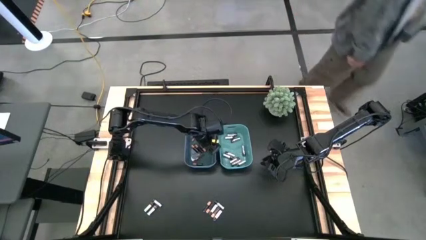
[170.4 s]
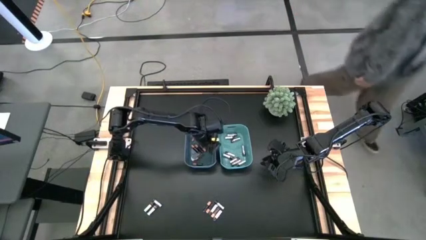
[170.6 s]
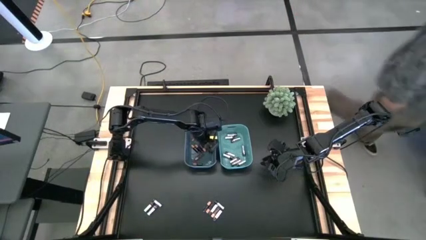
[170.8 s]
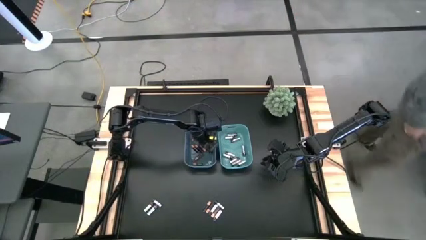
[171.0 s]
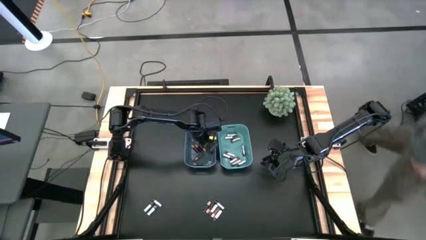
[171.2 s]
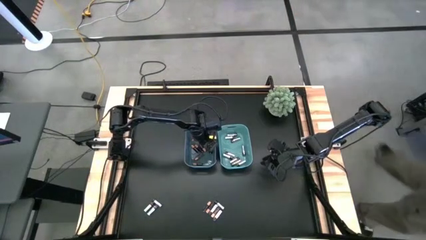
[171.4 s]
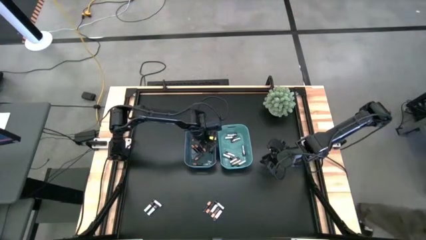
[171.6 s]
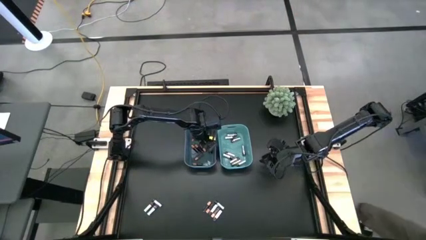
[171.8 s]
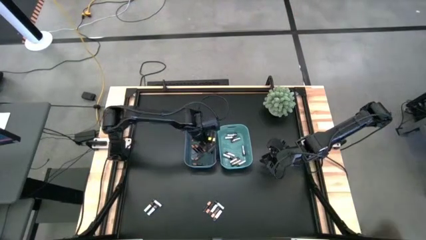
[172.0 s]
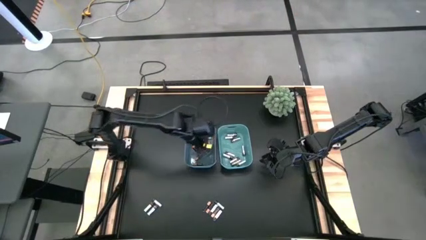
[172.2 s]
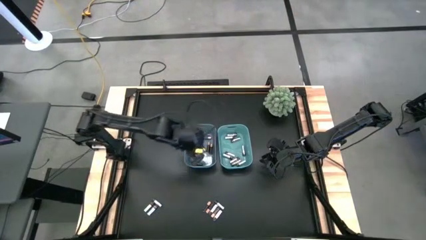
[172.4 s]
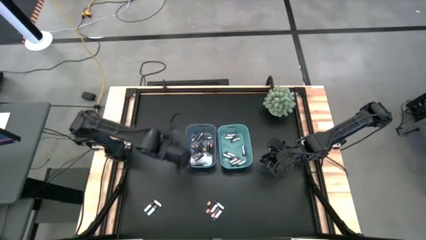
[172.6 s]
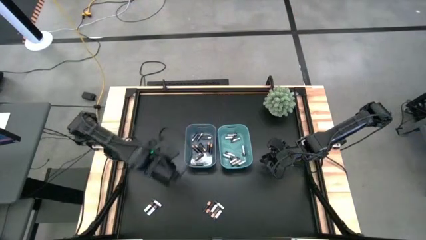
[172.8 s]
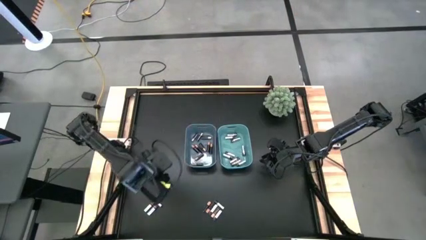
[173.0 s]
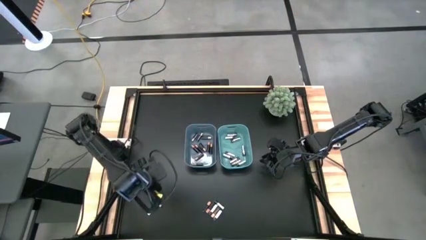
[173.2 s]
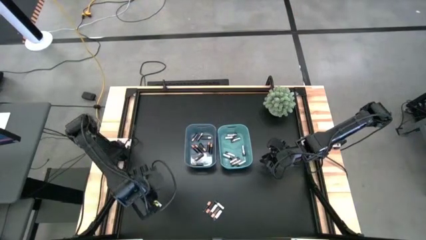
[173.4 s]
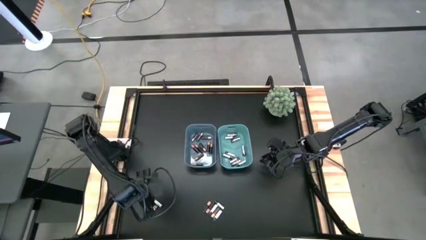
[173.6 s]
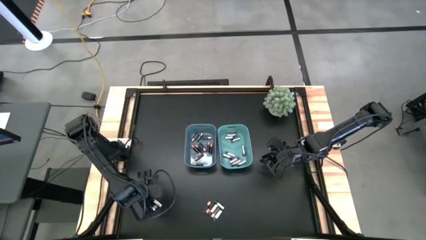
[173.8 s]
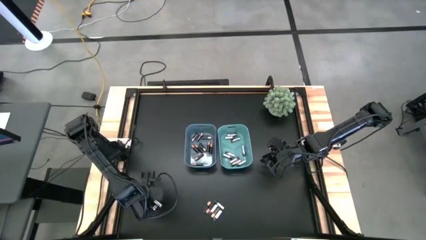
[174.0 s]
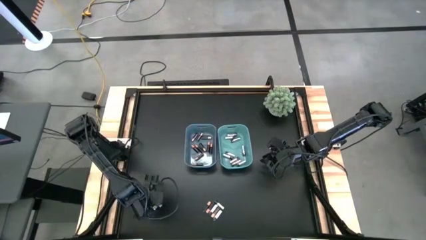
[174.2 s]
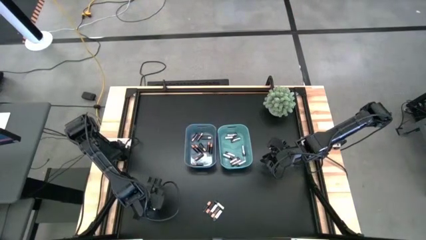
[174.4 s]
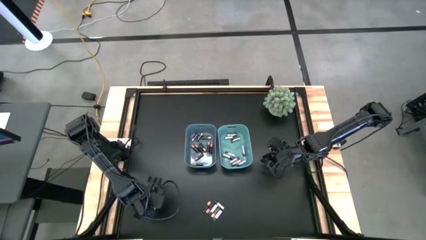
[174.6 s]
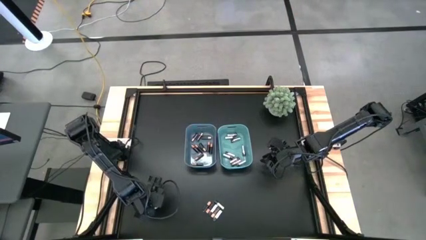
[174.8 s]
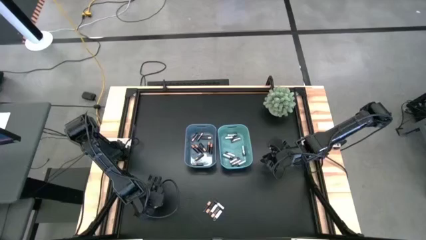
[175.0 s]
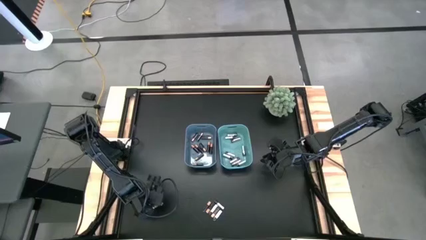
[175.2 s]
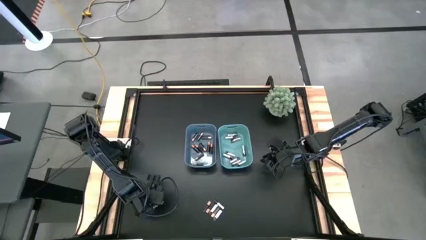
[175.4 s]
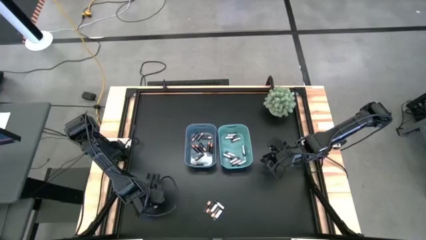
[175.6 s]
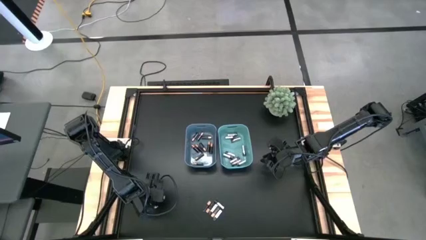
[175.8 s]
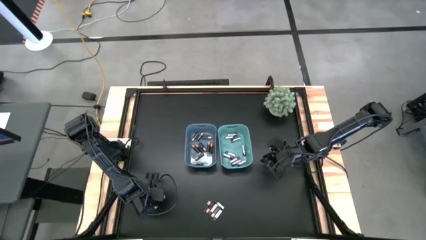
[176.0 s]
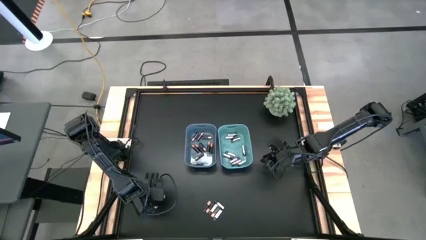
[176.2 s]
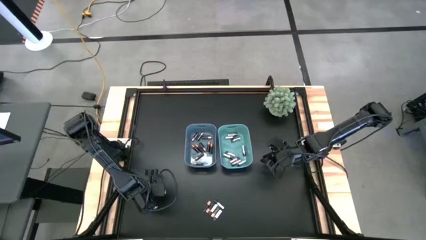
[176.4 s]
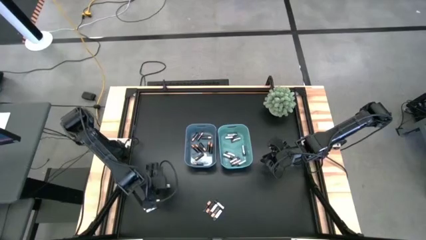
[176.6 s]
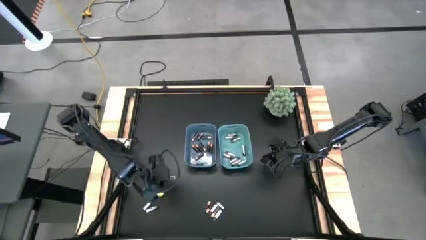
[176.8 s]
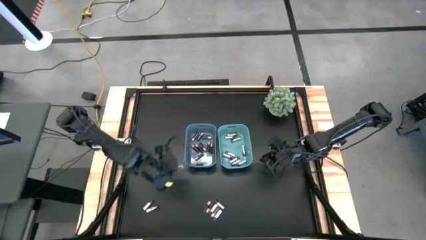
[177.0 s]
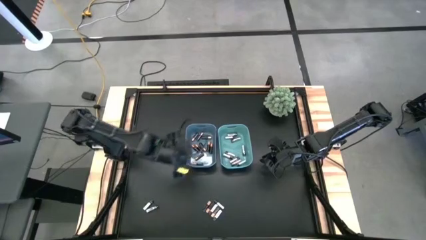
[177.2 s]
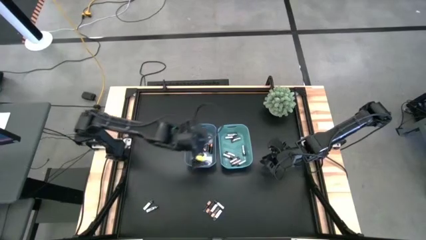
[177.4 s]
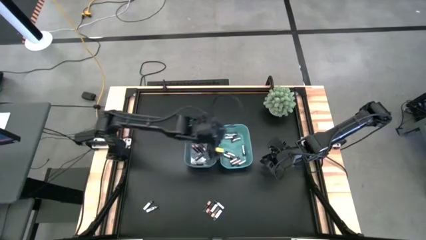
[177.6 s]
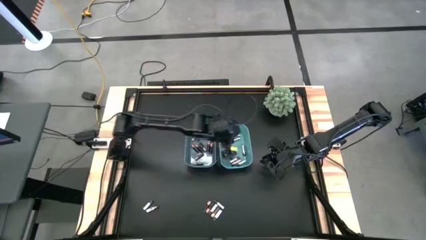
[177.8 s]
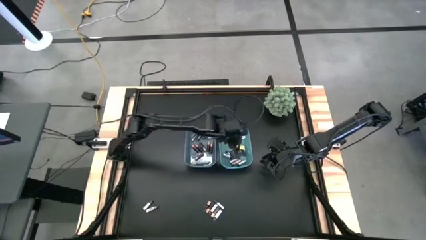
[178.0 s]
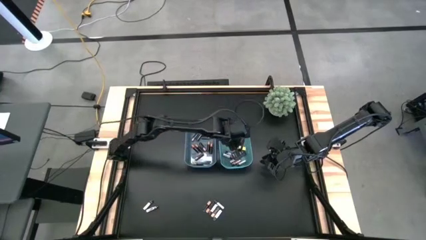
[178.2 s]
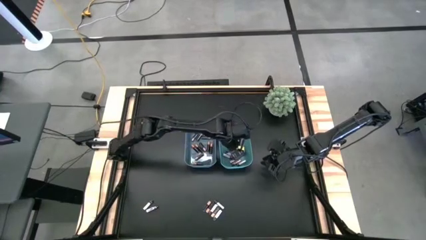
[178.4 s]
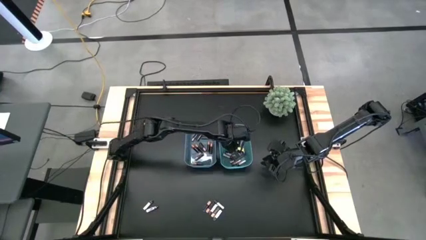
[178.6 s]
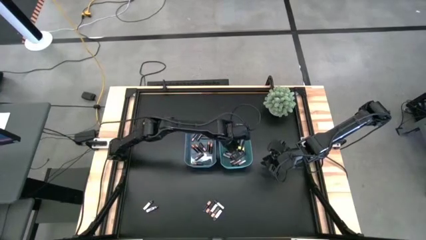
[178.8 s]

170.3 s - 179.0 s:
Task: Sort batteries
Put the white battery into the green bin

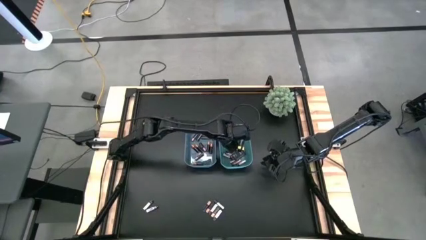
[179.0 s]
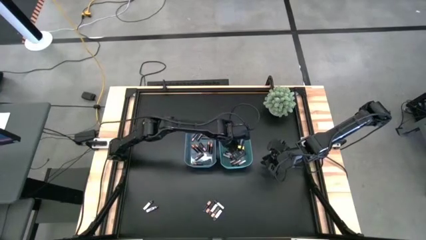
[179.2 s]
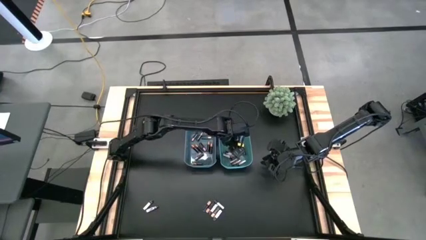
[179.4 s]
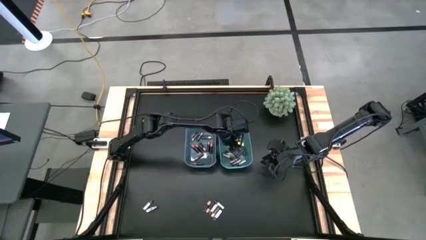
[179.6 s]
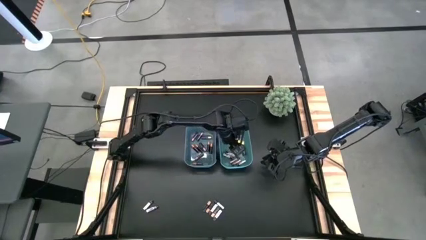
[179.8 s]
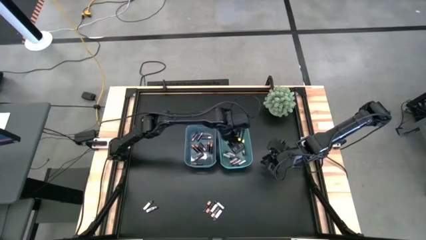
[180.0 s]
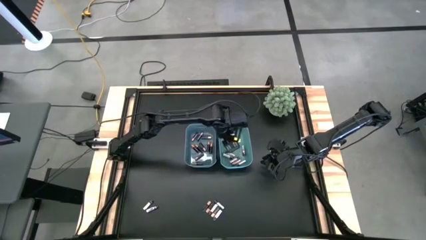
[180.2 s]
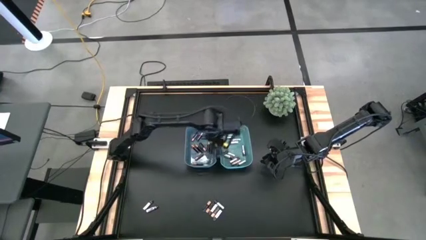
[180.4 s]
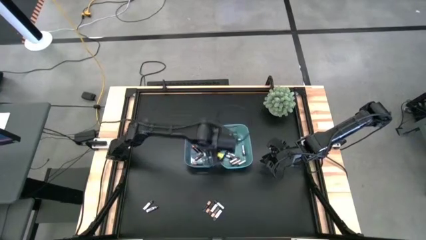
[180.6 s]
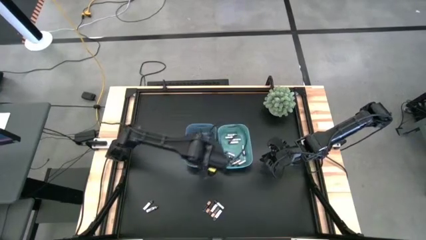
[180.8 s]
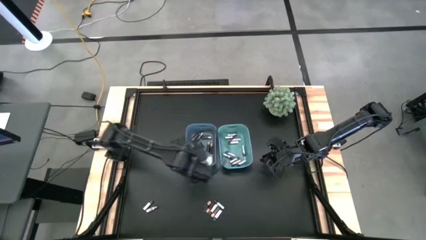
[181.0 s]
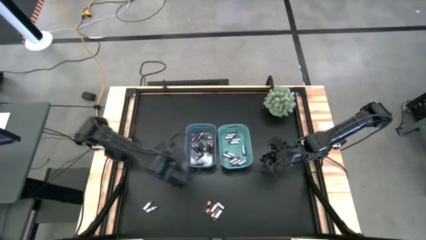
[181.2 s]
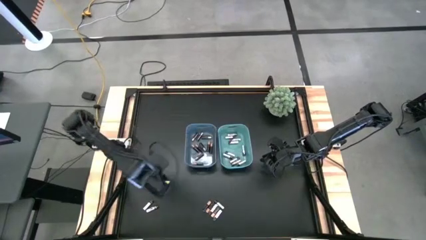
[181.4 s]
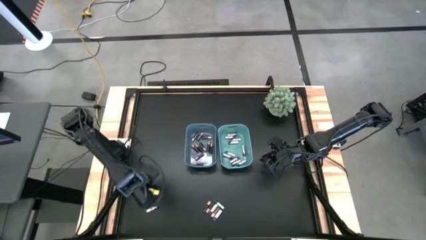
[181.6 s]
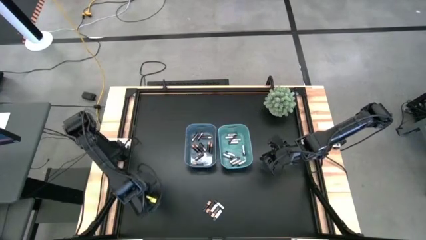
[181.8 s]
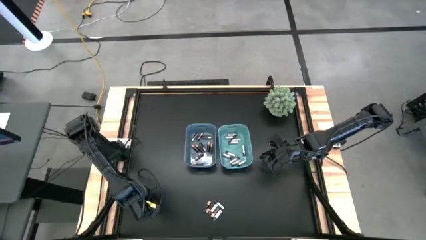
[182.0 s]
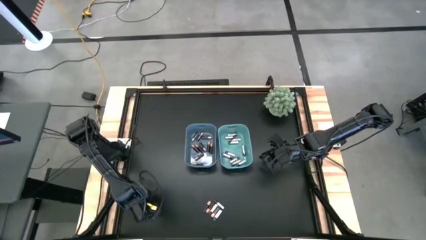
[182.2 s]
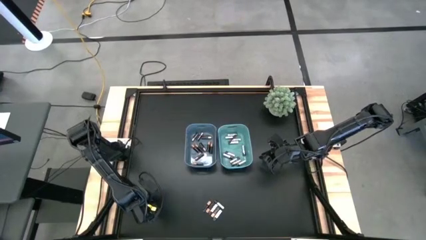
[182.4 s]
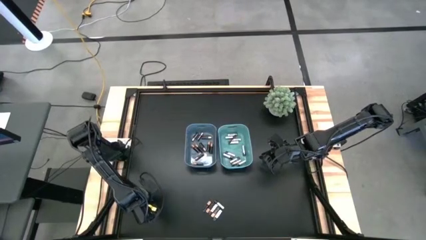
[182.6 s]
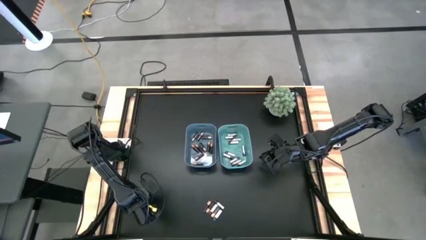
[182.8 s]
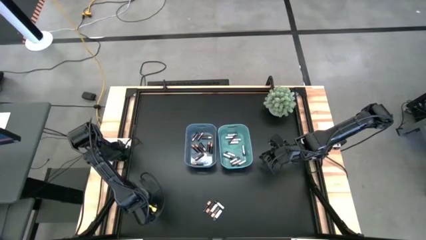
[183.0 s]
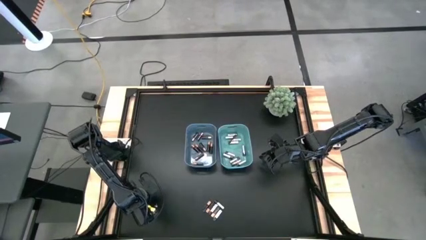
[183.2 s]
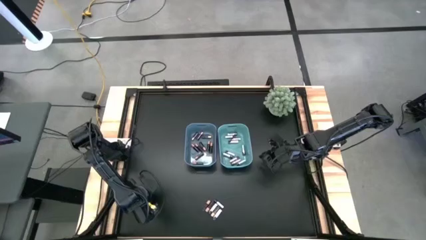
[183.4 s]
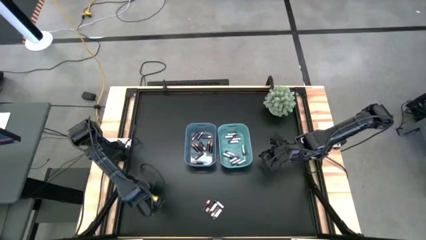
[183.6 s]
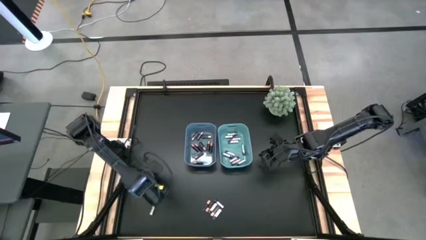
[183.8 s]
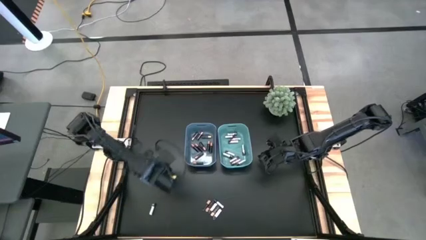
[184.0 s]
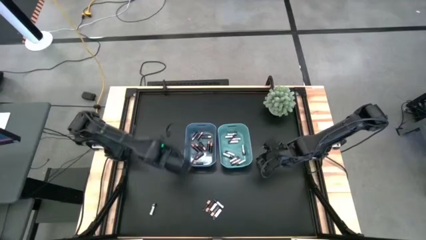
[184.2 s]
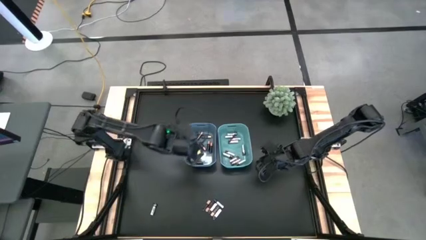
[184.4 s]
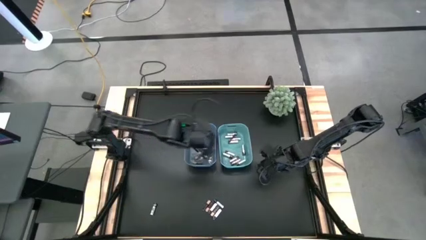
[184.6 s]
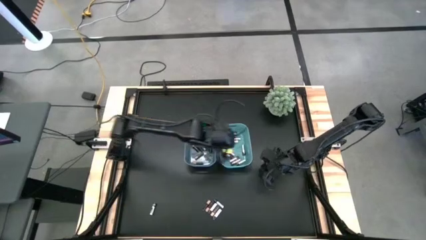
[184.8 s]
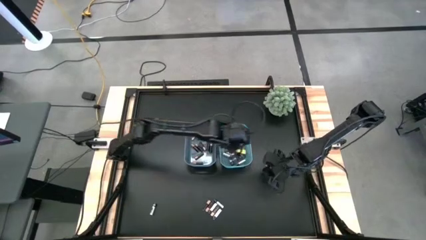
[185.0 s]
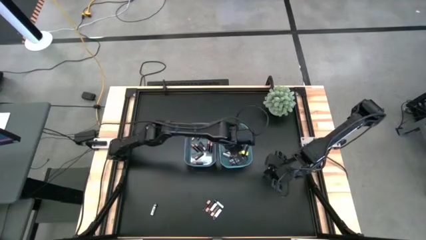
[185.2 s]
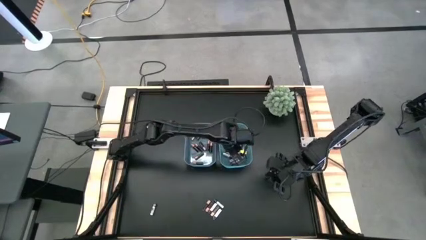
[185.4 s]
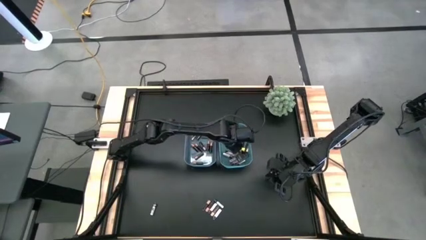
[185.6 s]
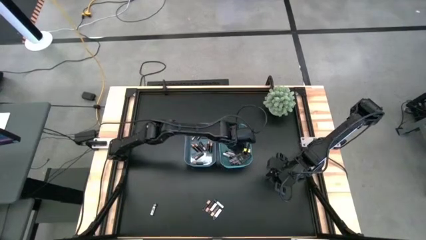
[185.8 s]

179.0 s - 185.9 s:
Put the white battery into the green bin
